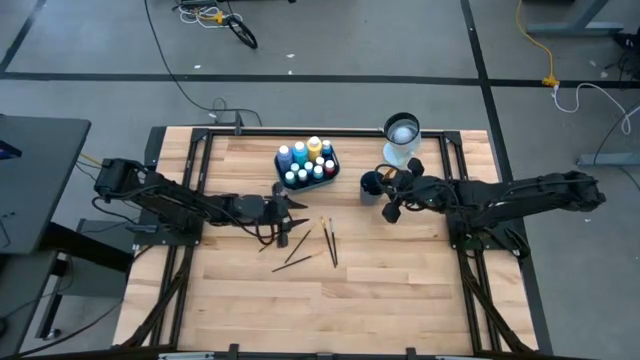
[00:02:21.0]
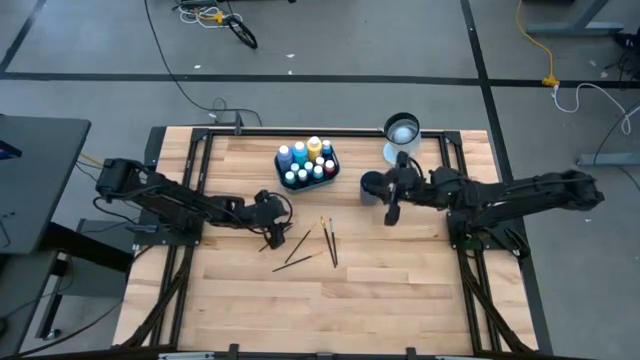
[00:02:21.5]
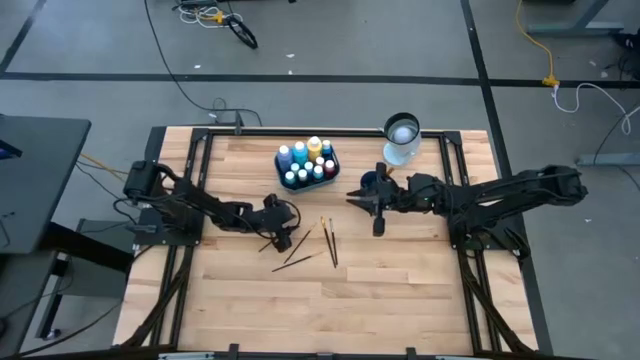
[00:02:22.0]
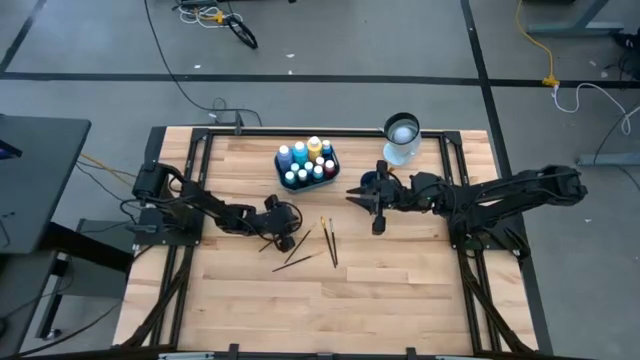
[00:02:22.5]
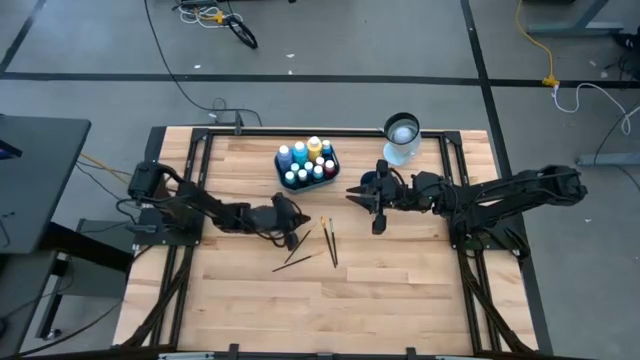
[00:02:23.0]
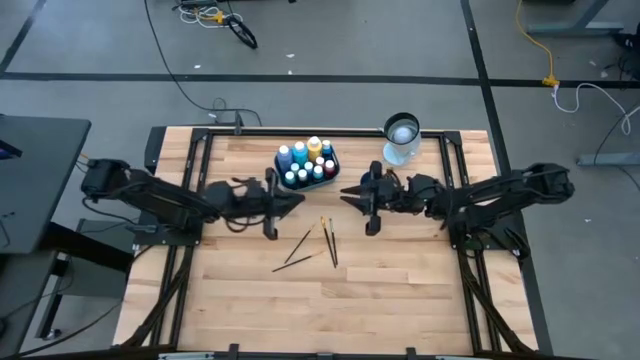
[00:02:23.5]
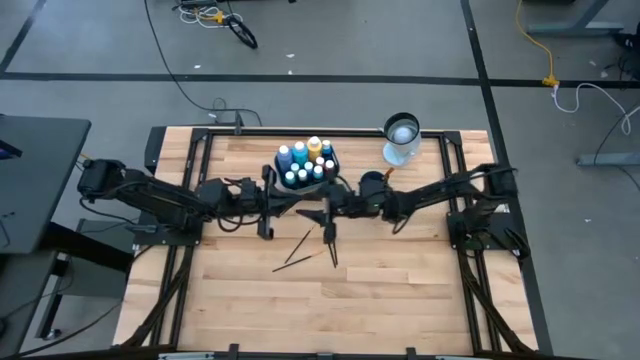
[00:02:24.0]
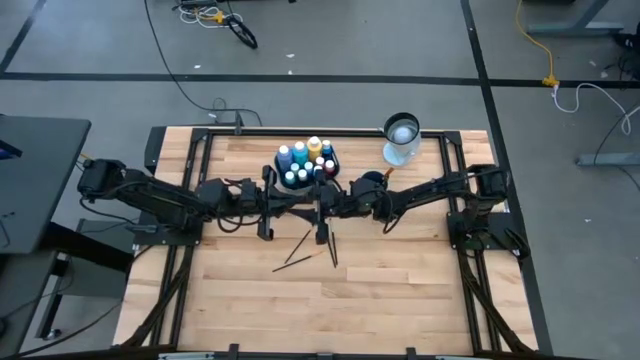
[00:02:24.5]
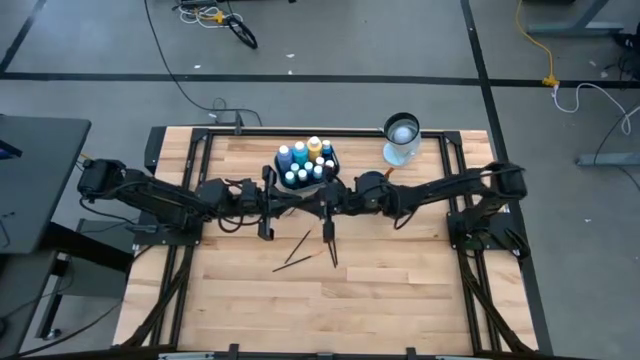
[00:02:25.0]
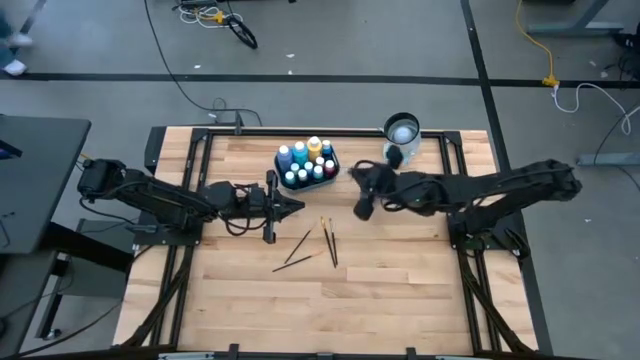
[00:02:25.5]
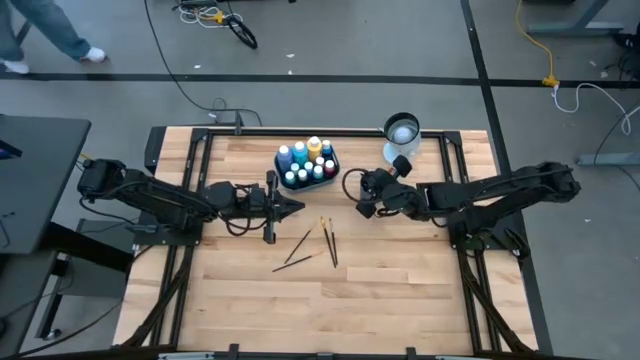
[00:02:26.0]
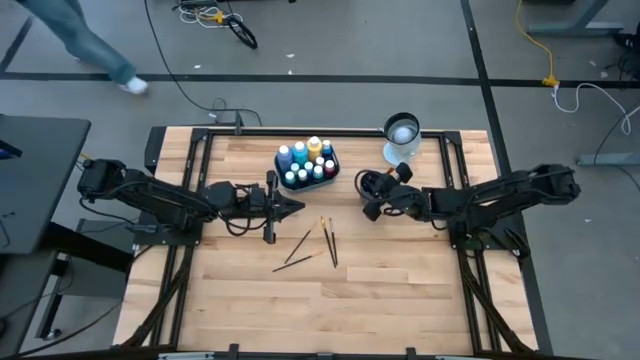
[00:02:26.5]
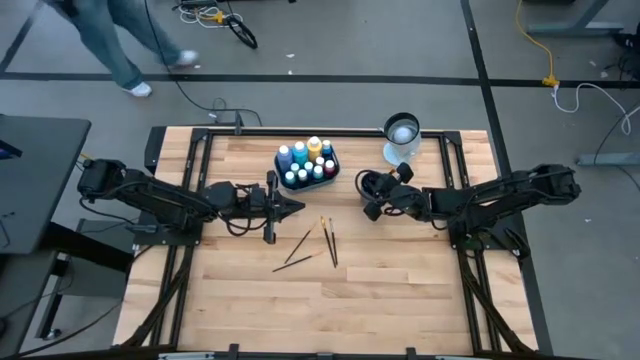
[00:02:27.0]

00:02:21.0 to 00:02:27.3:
Task: Pick & Place Paint Supplies
Put the gold paint brush into the blue cup

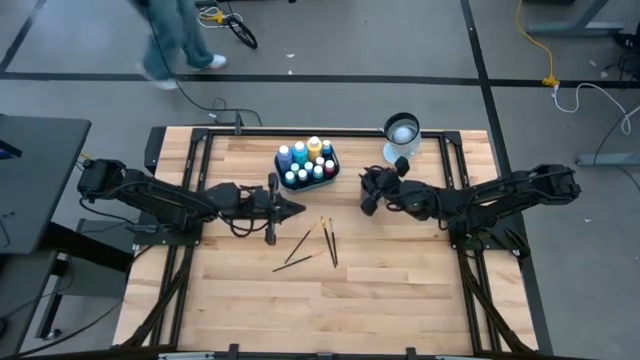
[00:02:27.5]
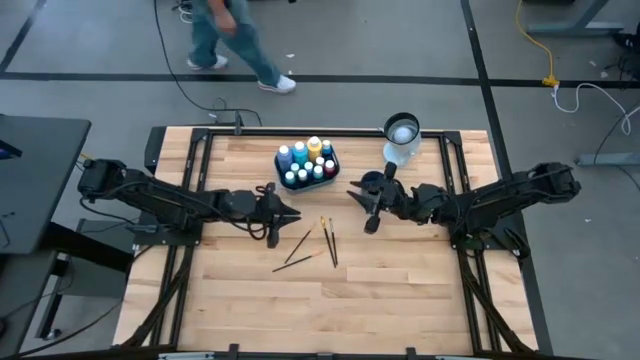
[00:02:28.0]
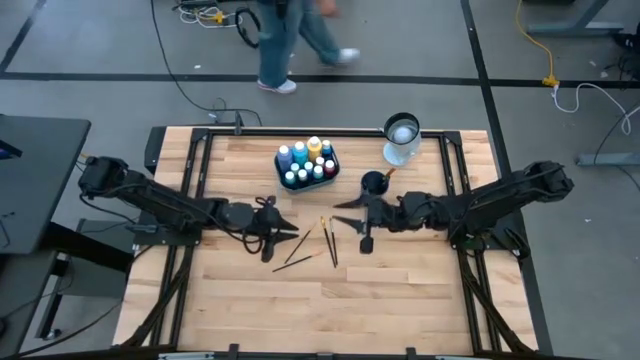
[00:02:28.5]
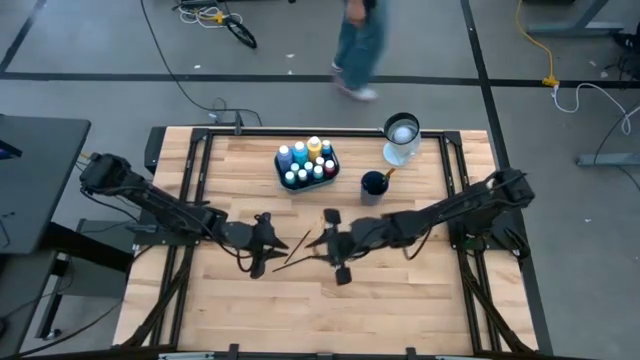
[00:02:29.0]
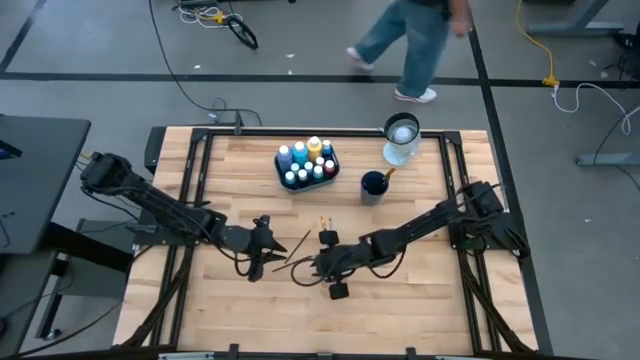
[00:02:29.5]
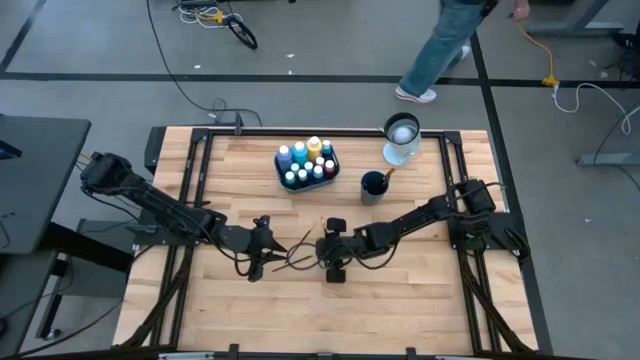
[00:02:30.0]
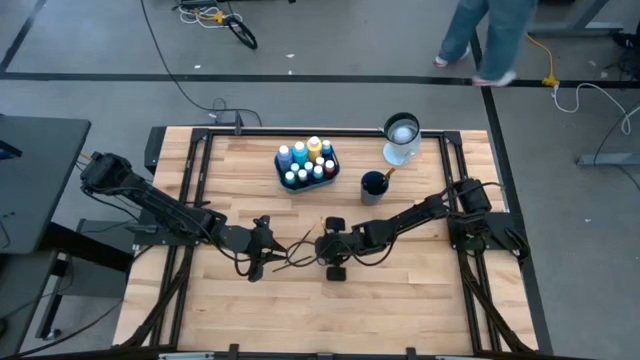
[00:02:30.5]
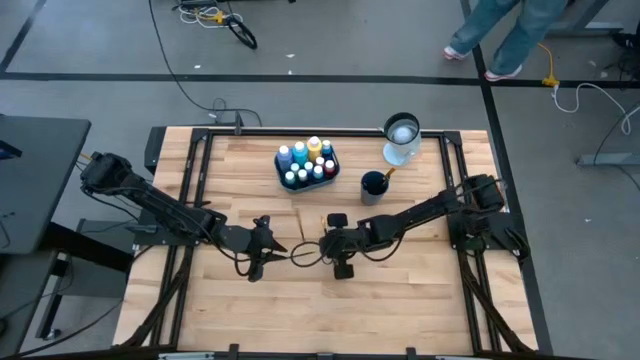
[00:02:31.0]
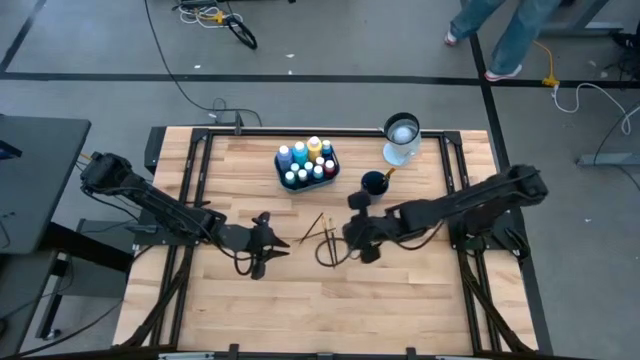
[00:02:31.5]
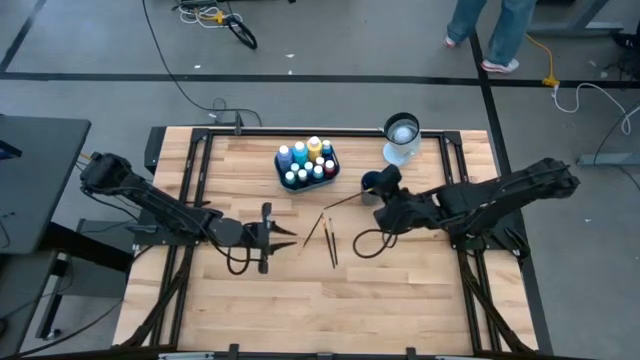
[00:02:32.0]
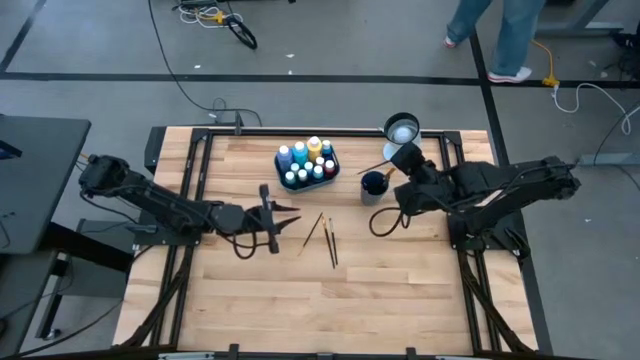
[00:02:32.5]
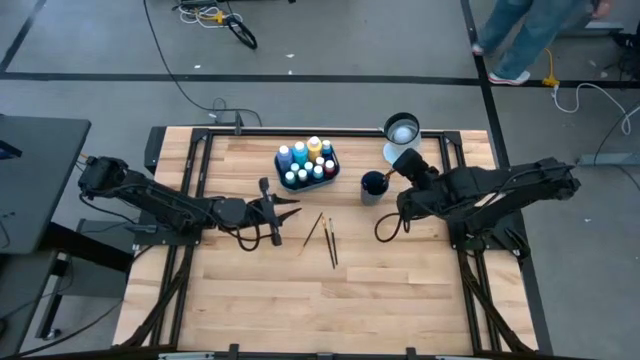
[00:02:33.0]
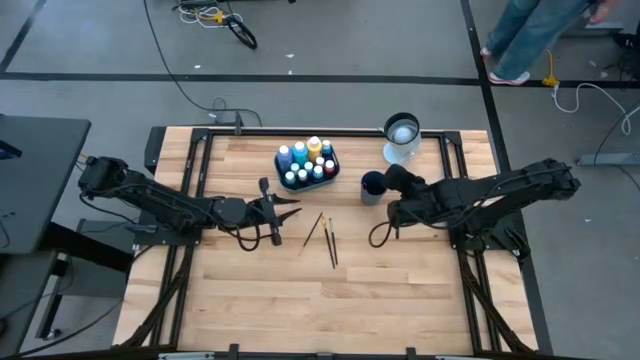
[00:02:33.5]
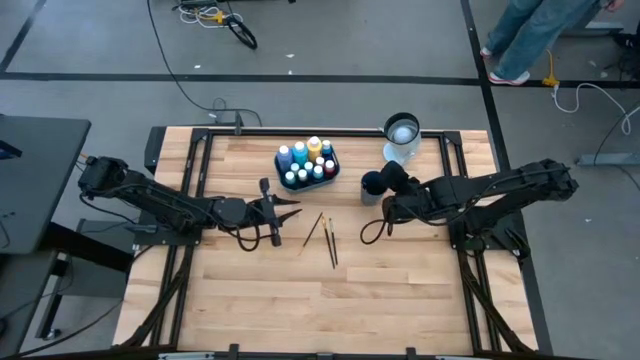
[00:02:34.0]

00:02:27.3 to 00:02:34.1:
Put the gold paint brush into the blue cup

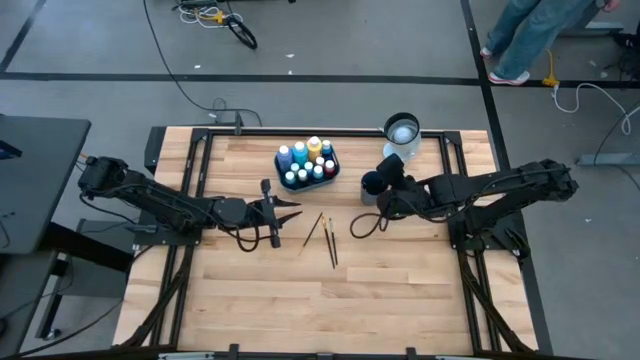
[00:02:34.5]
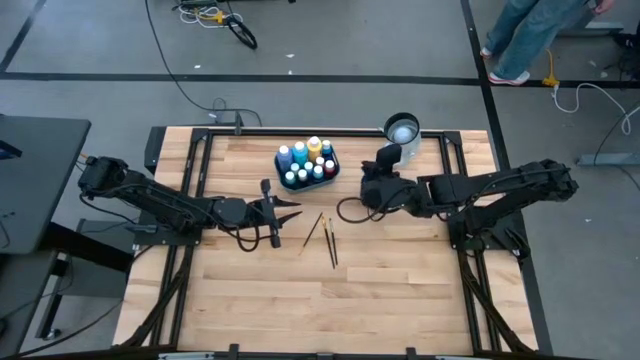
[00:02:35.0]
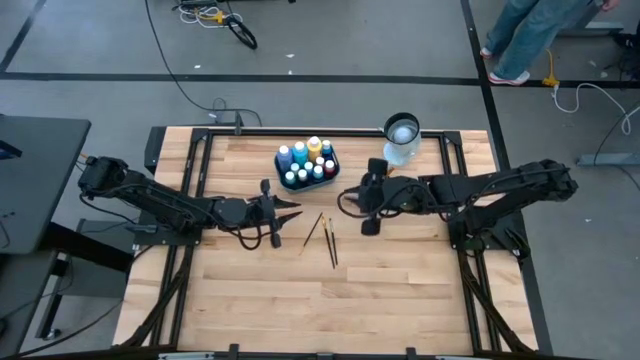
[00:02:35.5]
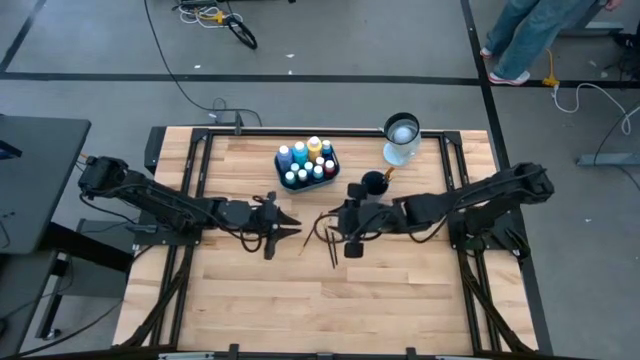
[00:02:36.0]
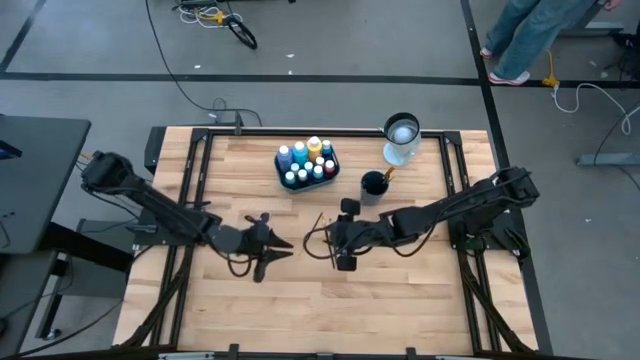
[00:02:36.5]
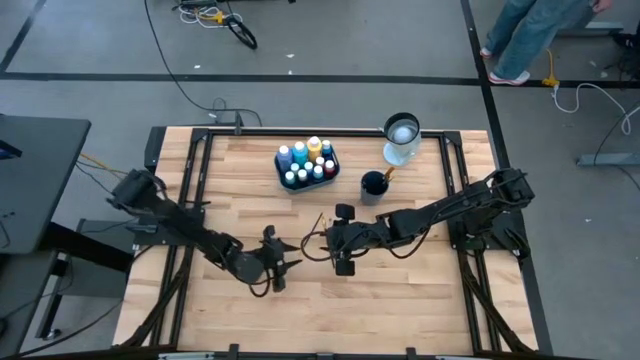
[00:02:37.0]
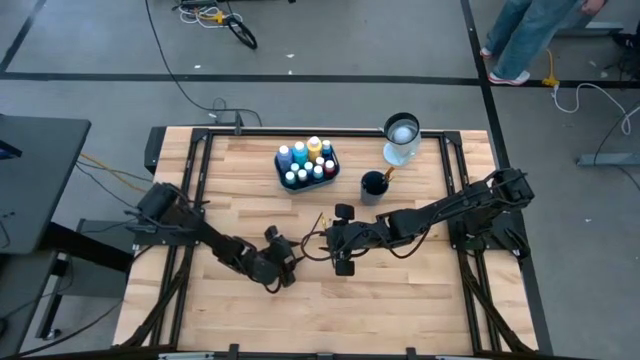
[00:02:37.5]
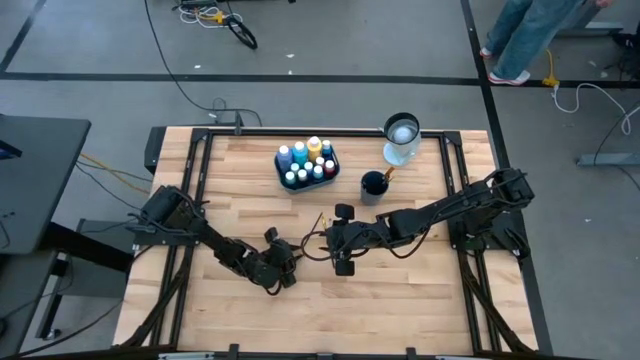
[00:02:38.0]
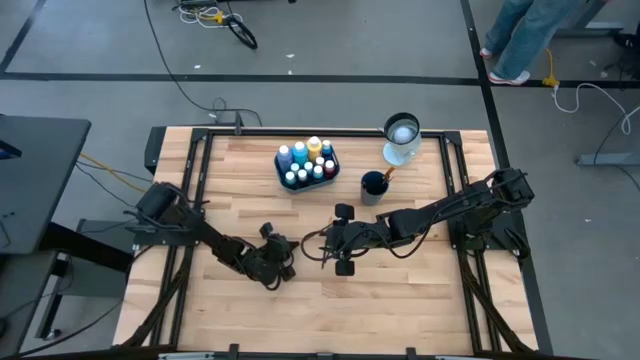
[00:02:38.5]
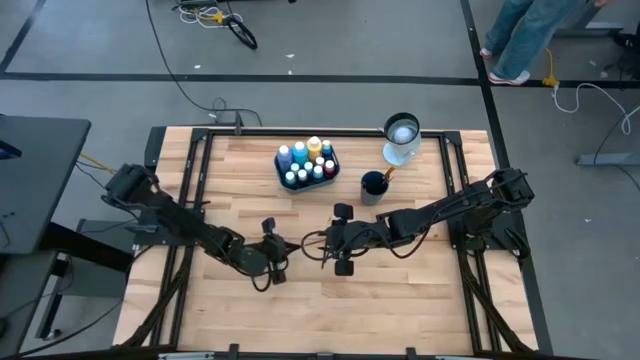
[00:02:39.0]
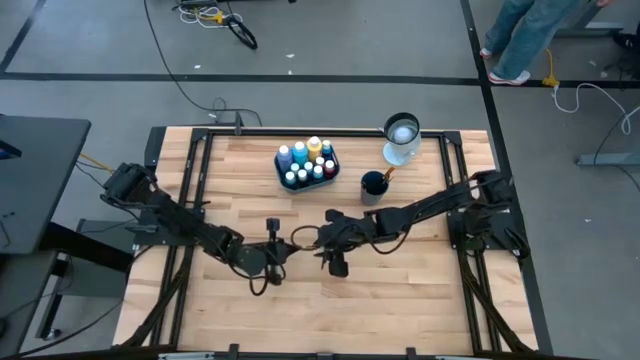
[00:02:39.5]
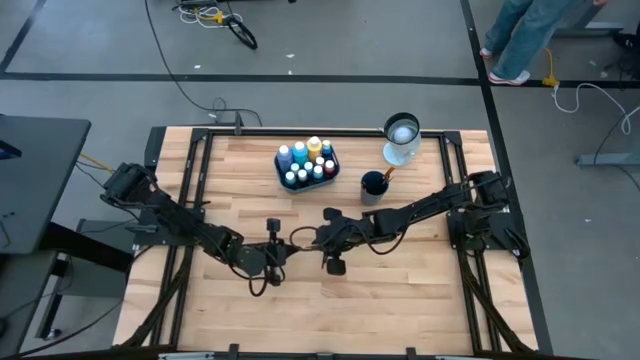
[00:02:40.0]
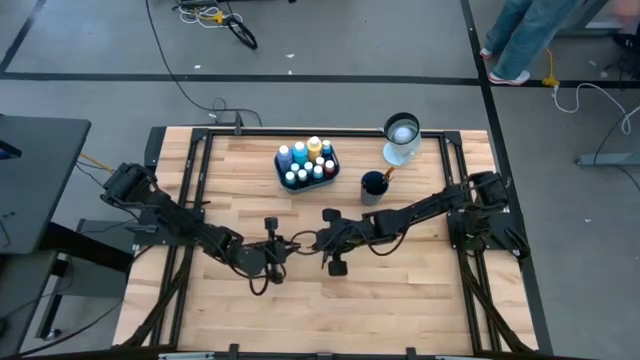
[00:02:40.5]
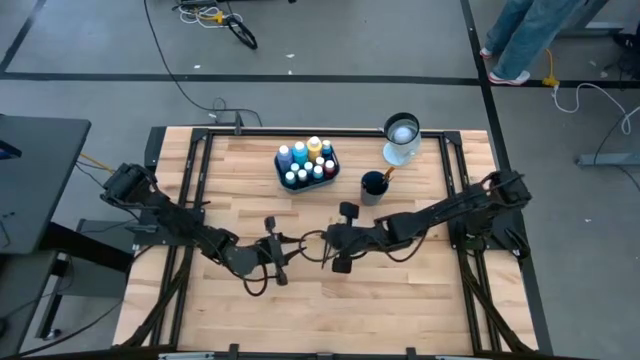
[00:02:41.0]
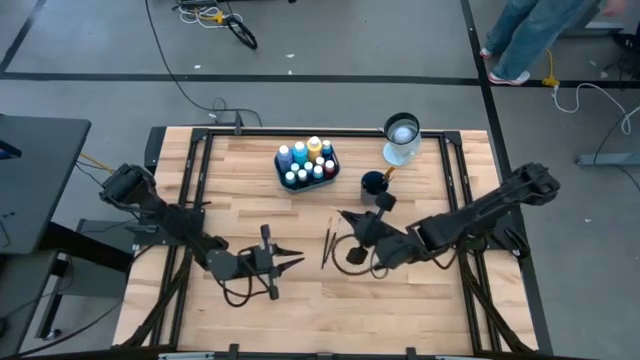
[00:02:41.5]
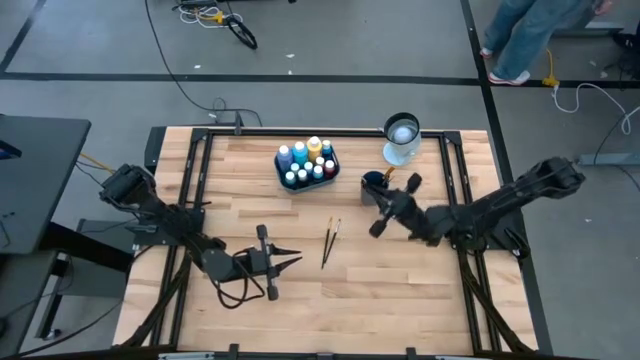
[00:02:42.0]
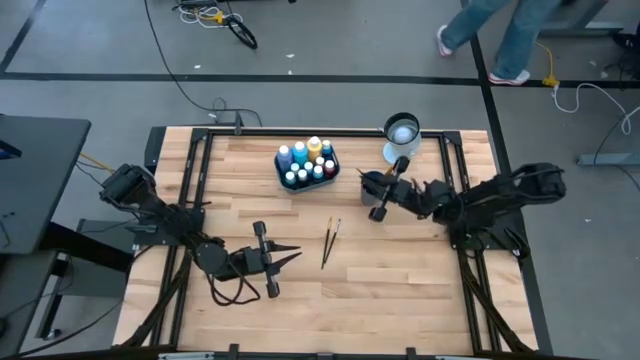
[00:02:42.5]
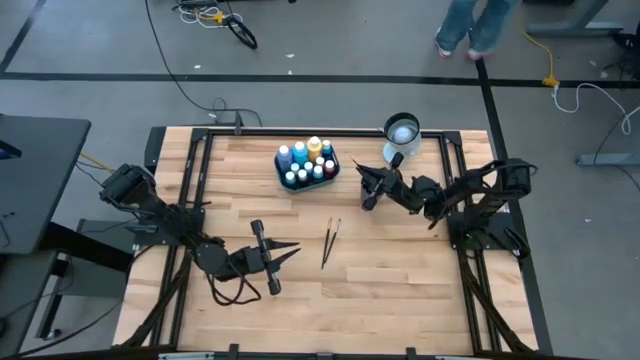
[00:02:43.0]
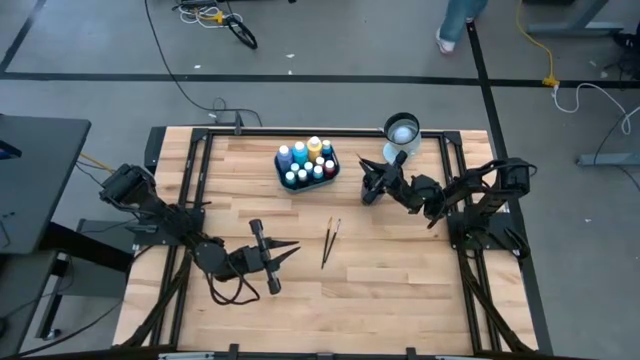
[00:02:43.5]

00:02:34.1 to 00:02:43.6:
Put the gold paint brush into the blue cup
